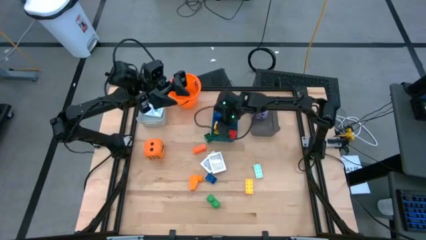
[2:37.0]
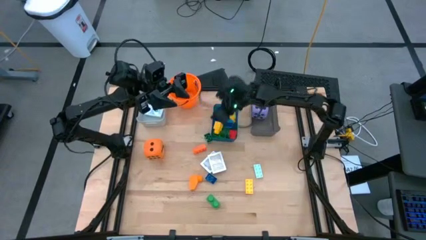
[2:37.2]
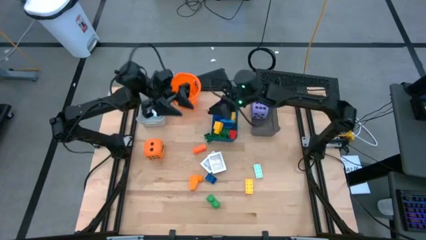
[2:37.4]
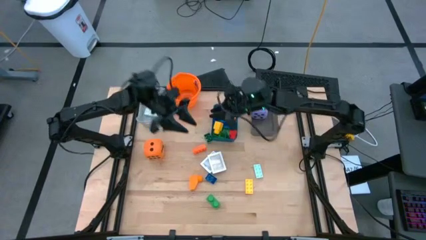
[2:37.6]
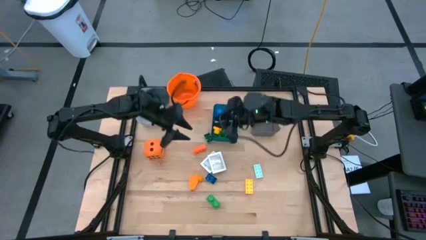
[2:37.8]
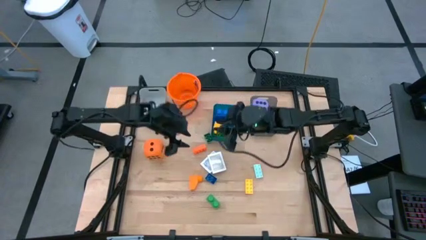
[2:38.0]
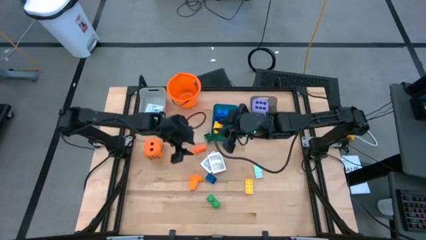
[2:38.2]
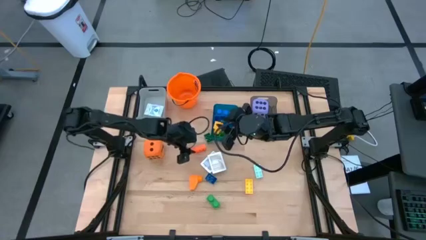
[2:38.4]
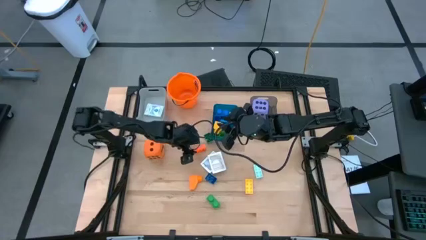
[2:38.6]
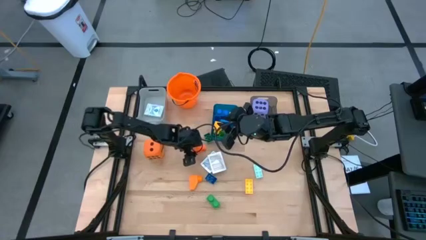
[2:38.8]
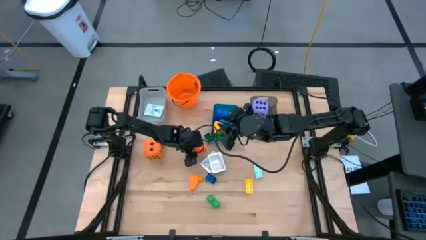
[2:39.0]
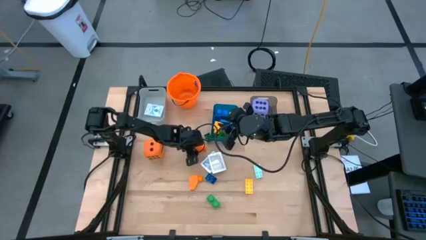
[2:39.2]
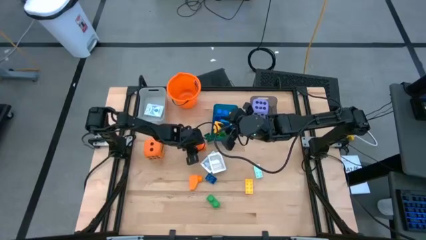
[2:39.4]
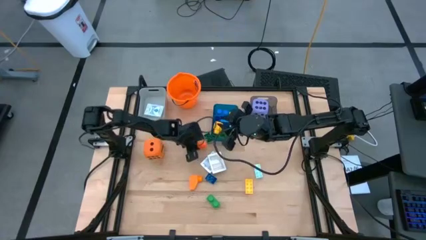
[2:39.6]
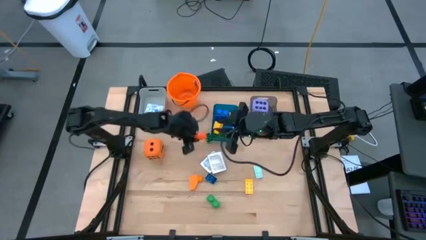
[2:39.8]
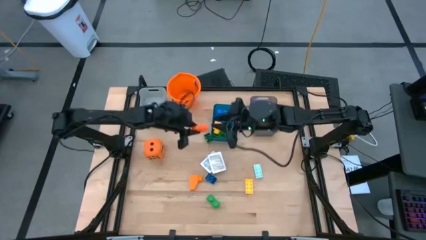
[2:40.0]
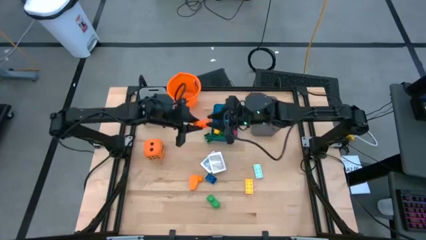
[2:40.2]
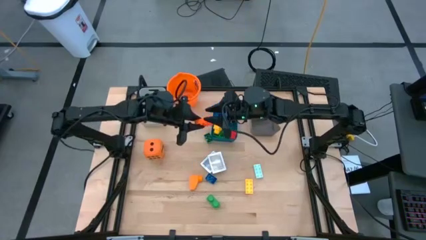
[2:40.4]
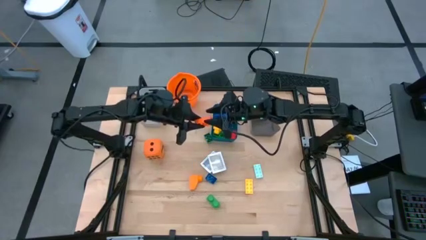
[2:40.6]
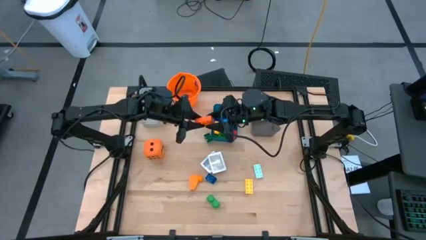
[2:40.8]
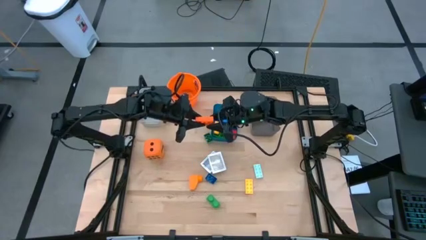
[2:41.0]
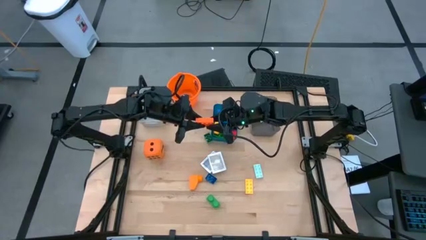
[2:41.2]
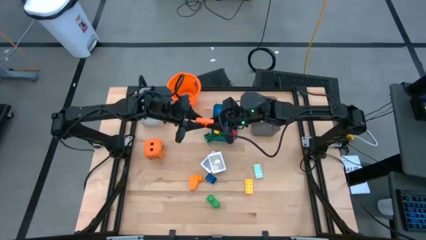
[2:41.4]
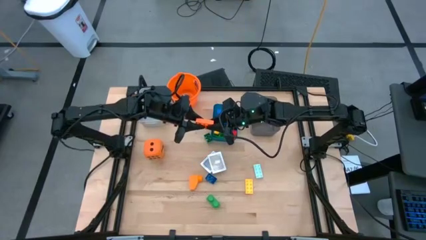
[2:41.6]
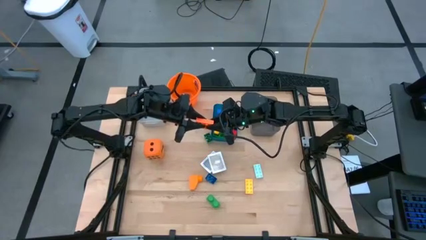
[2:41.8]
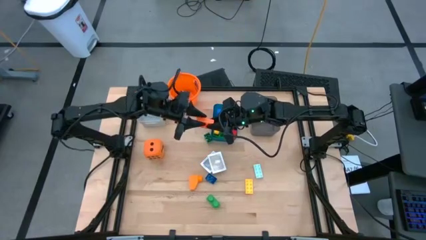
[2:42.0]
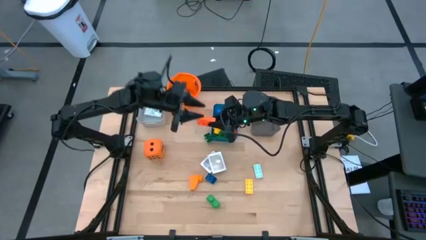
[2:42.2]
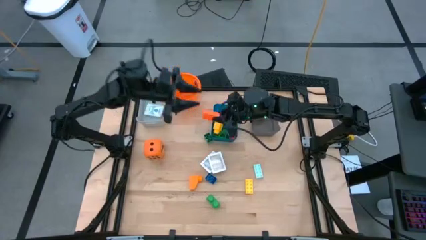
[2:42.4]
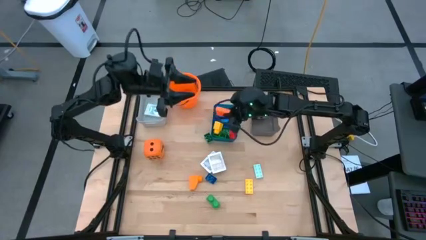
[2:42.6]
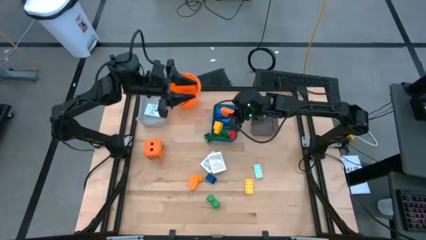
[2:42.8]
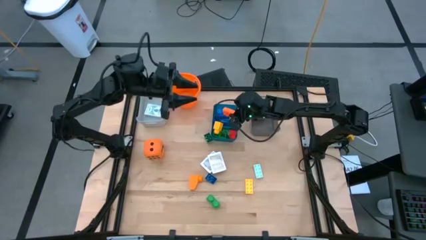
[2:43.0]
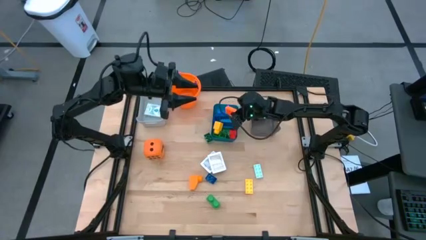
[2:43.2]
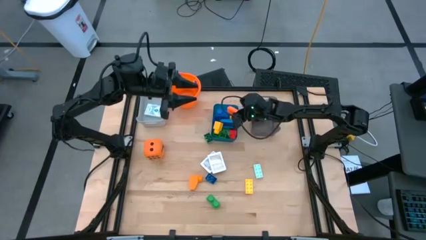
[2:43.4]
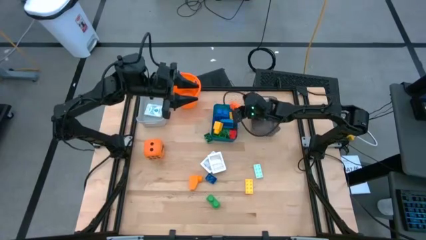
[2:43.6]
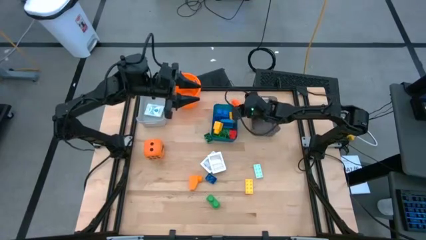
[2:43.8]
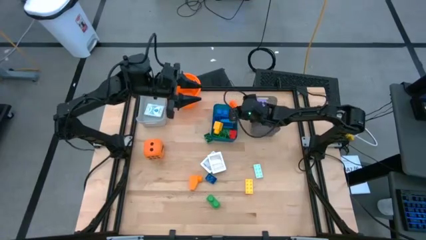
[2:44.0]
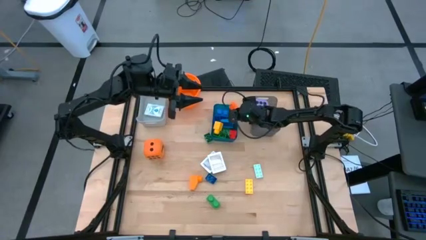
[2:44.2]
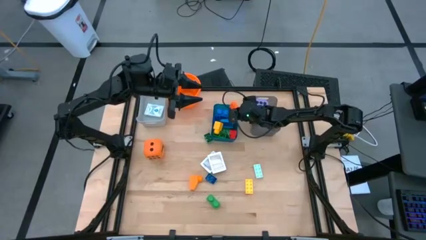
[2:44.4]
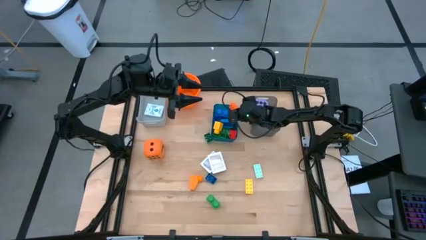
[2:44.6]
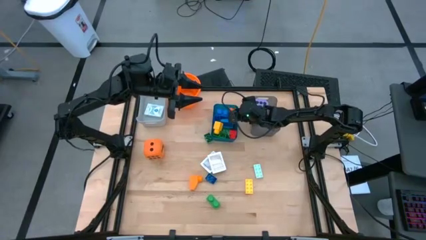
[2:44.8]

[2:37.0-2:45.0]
Task: Pick & Place Toys
Put the orange game piece into the blue bin

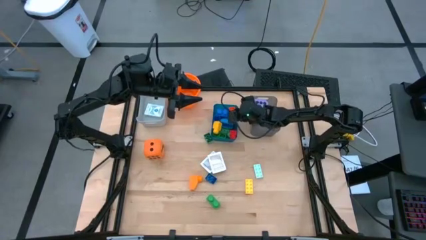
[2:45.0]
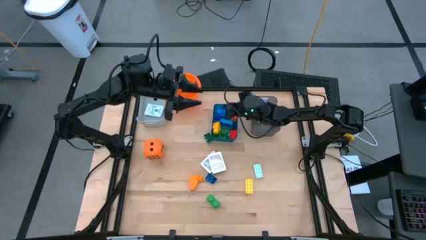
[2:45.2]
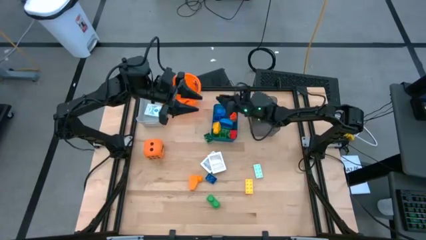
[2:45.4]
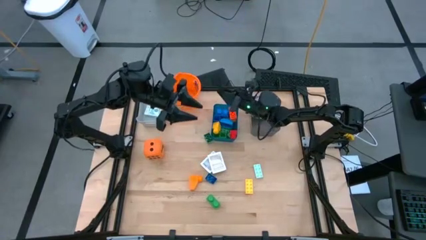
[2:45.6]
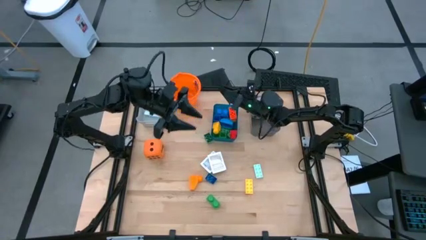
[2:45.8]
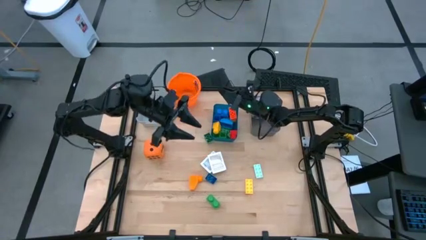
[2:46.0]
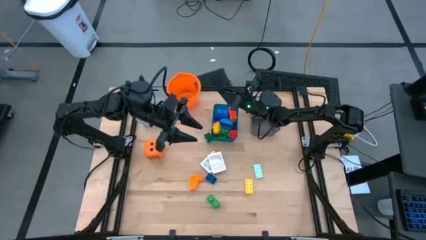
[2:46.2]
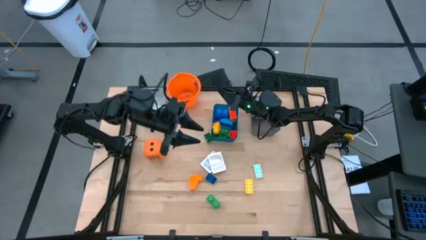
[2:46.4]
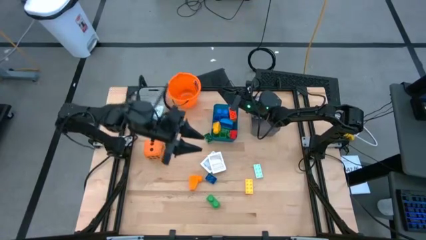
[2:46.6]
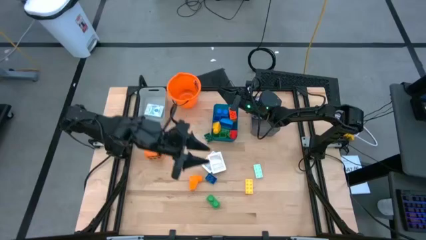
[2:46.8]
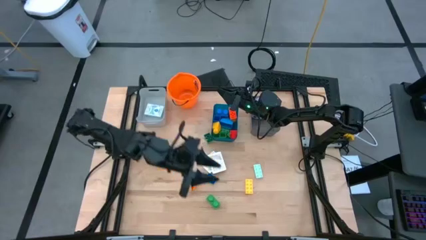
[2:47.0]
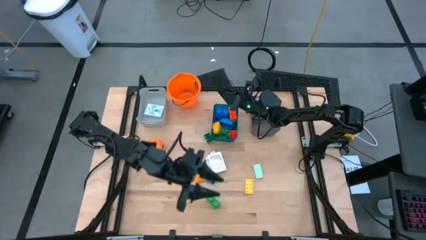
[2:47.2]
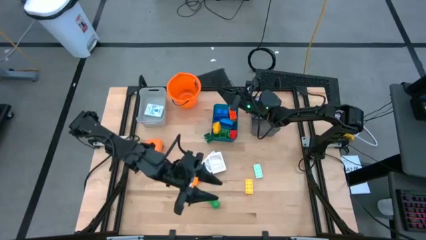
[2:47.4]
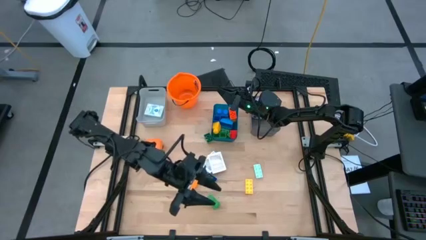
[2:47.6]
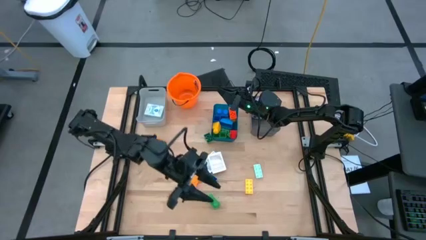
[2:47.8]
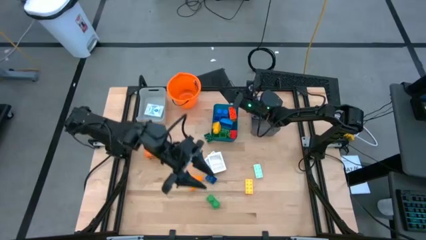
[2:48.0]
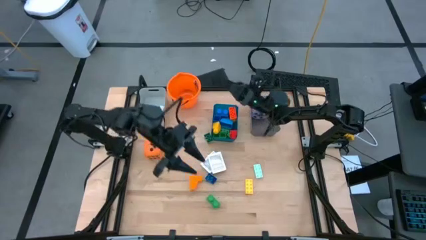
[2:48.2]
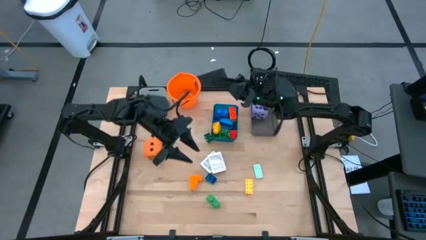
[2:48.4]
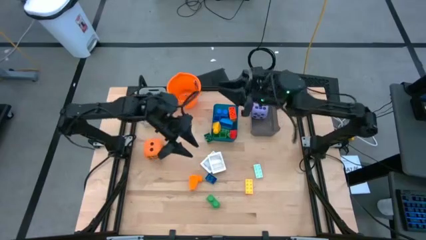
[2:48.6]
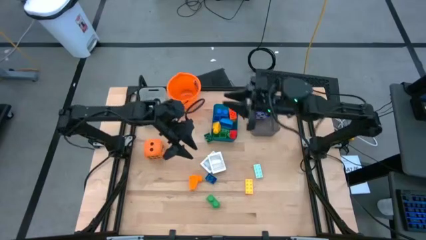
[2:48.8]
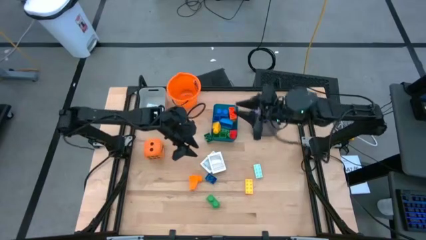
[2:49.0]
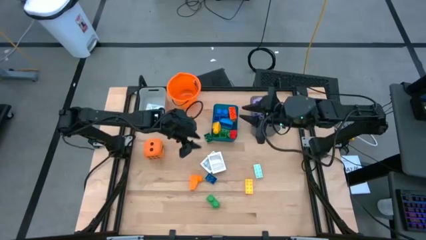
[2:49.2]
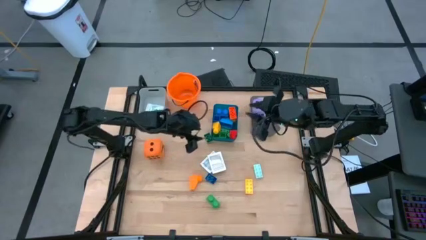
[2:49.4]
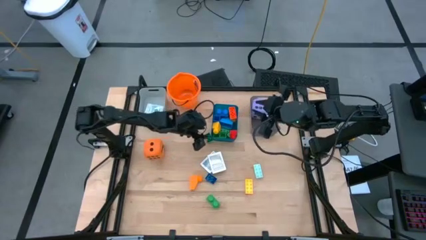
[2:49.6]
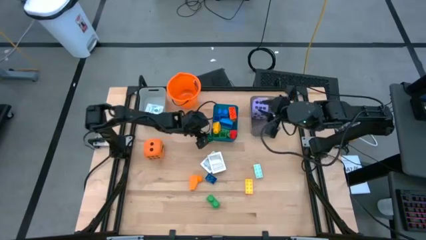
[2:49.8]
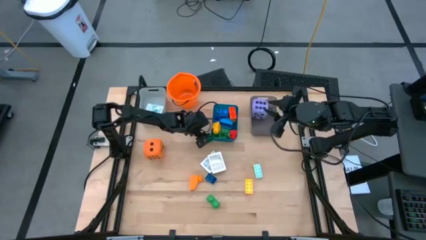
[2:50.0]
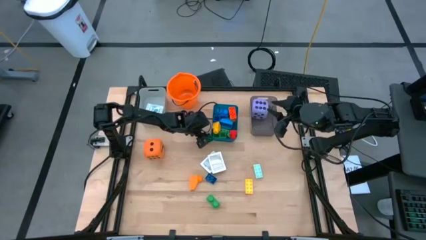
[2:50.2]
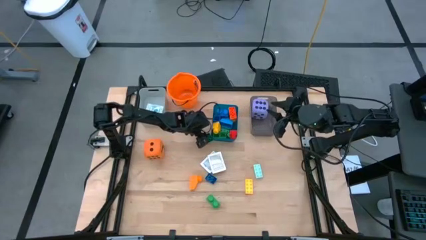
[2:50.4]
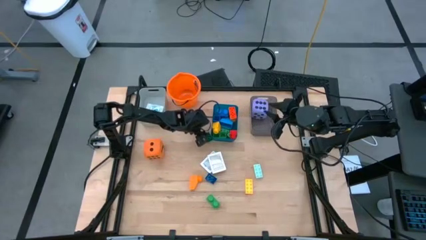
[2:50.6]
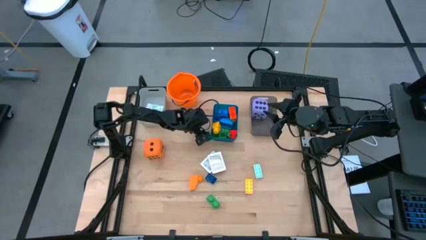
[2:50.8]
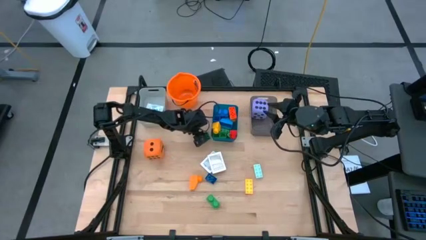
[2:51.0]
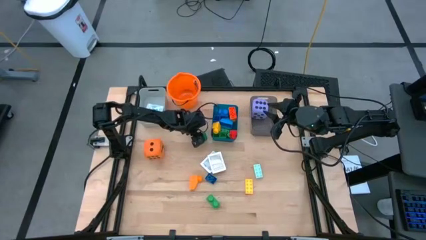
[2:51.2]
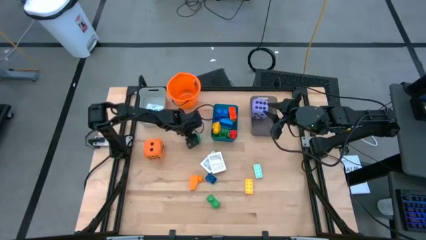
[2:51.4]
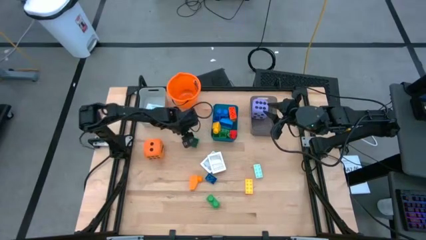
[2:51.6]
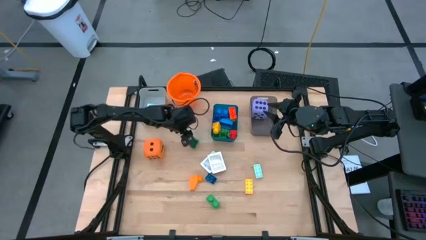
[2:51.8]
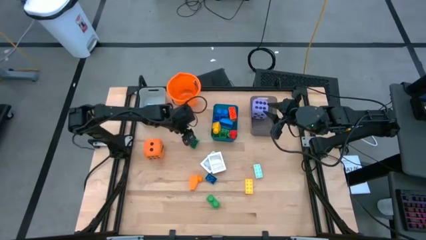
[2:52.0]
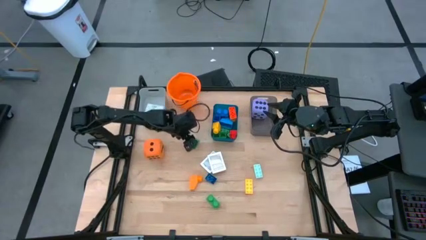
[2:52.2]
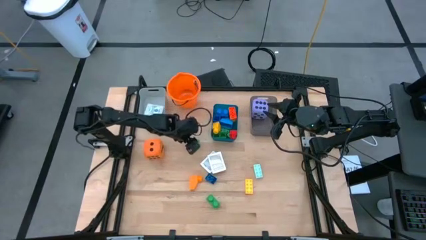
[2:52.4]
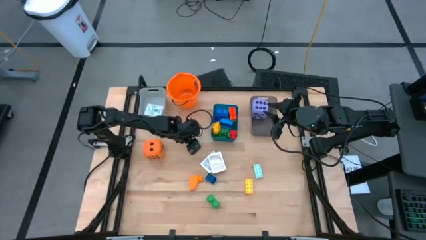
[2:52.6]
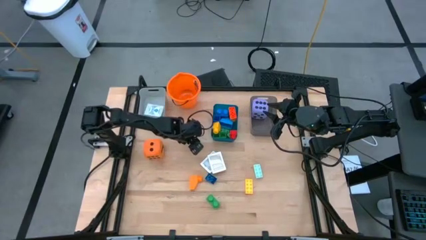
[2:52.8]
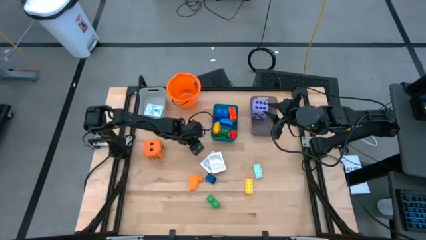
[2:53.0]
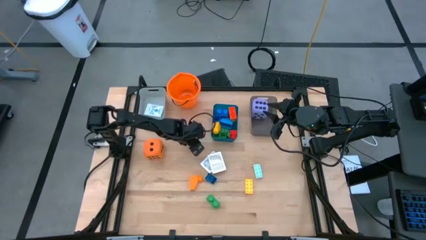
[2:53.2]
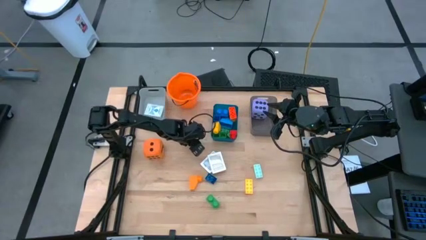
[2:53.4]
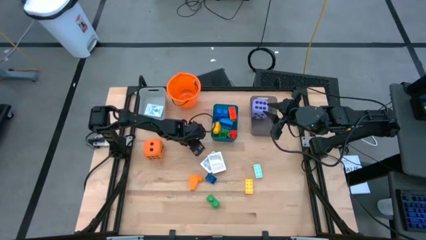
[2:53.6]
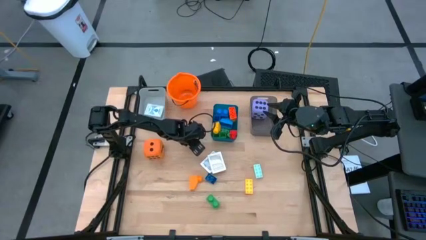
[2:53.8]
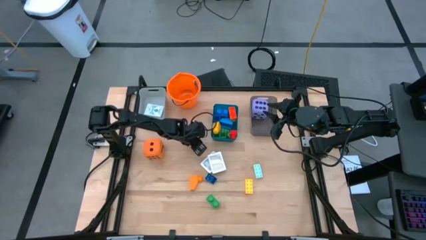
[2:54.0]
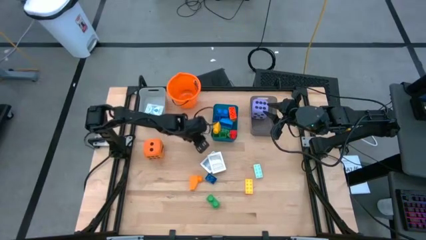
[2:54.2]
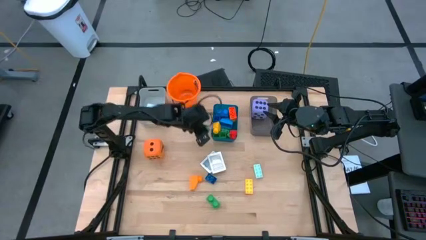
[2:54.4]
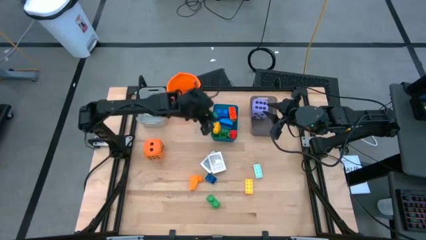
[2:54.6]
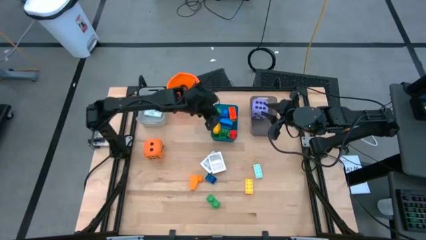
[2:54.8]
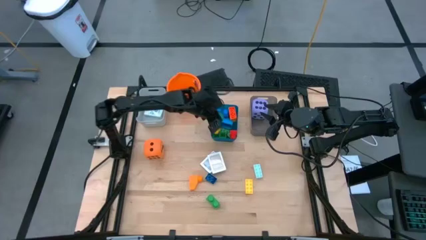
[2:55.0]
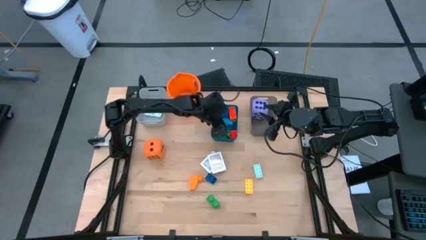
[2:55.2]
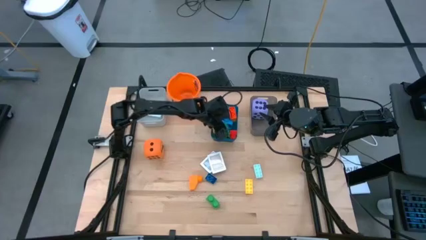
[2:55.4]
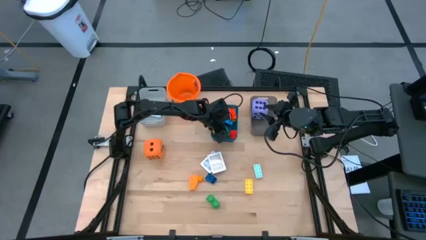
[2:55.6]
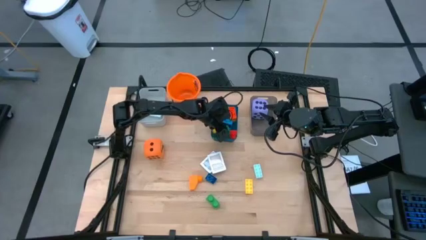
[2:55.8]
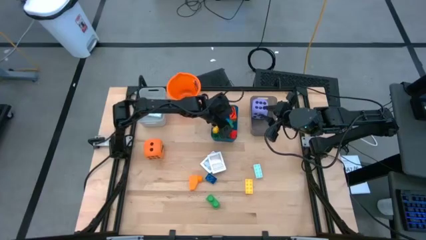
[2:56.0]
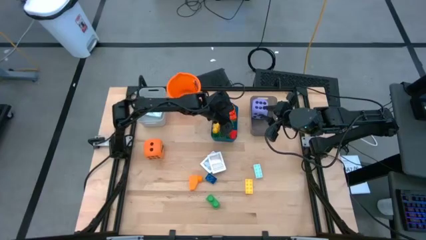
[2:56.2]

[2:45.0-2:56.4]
Put the green game piece into the blue bin
